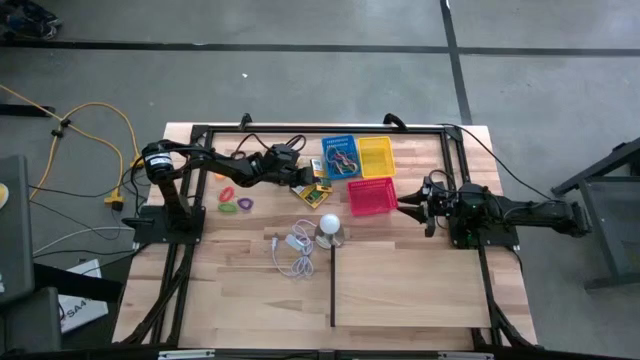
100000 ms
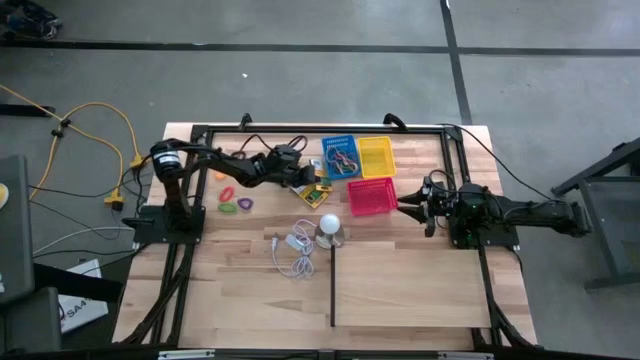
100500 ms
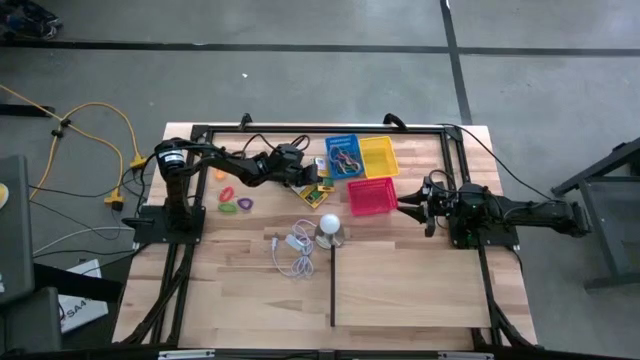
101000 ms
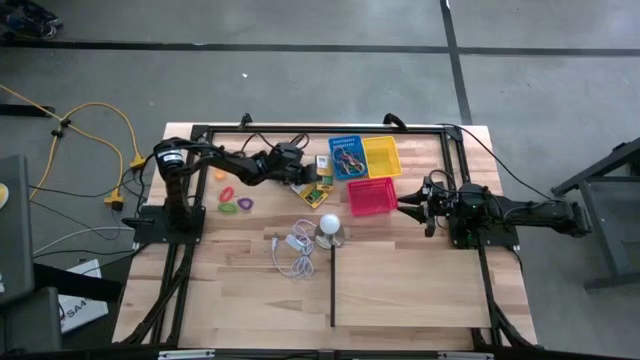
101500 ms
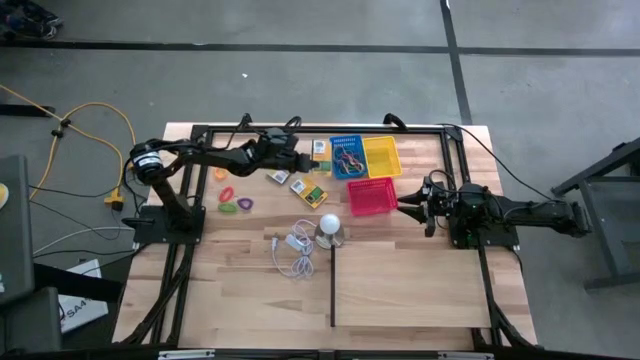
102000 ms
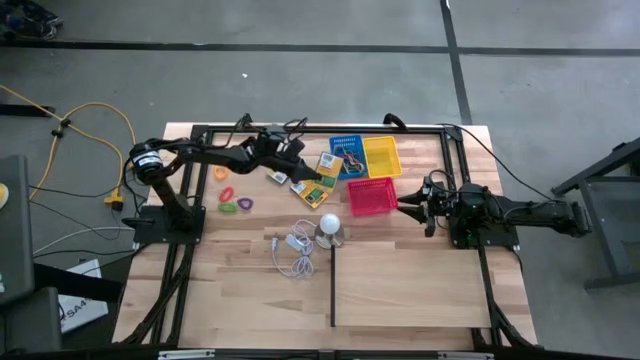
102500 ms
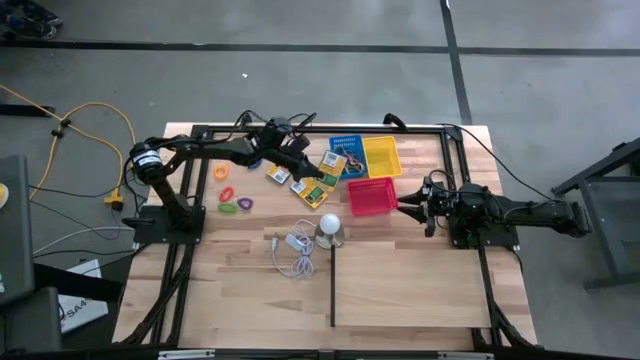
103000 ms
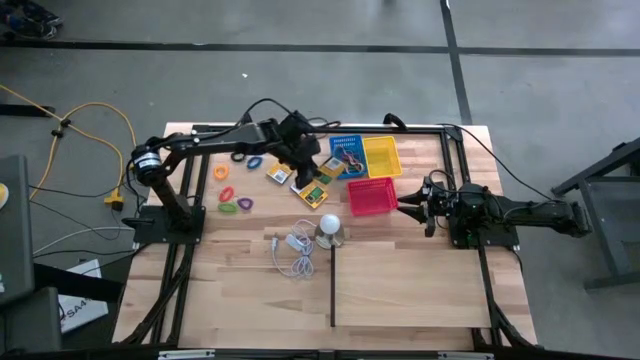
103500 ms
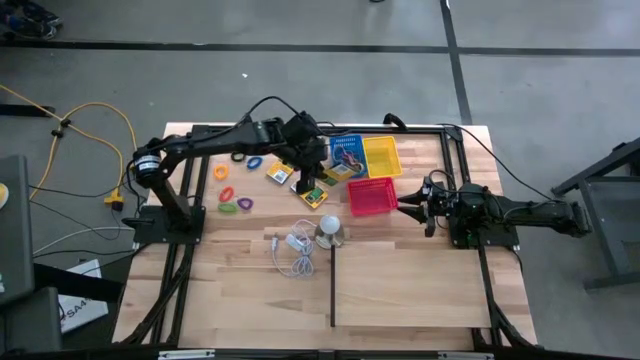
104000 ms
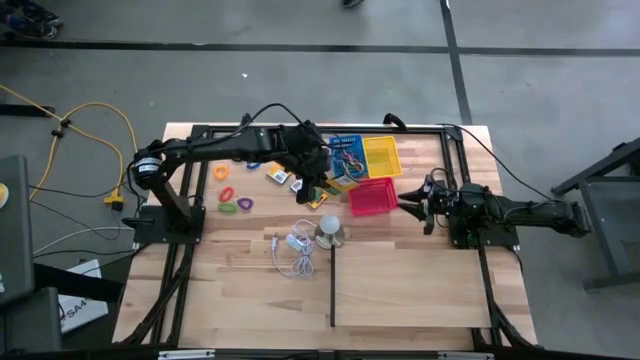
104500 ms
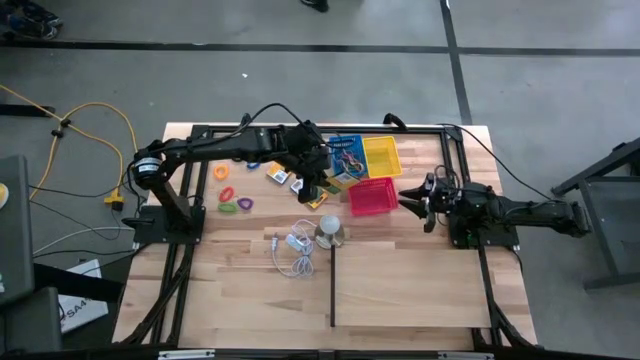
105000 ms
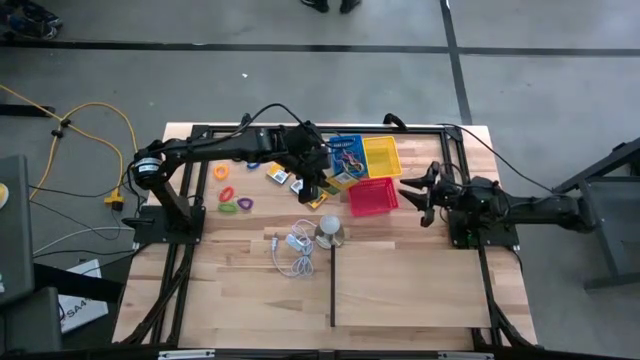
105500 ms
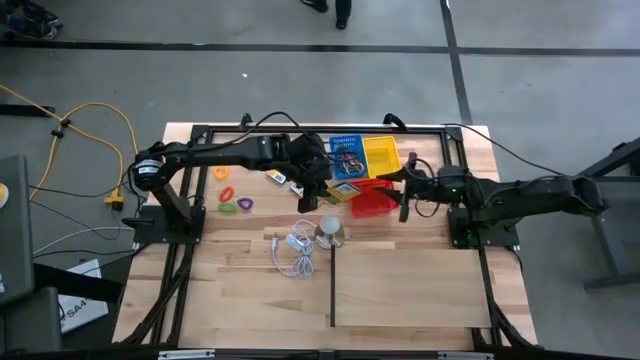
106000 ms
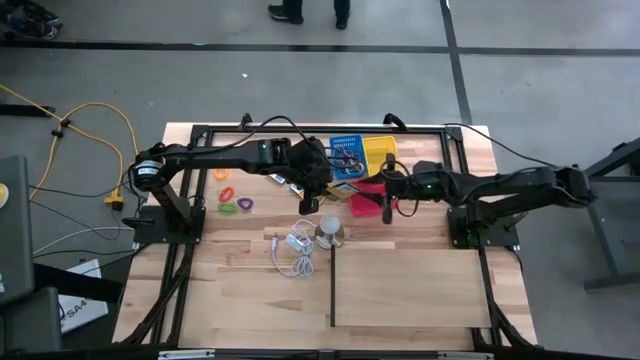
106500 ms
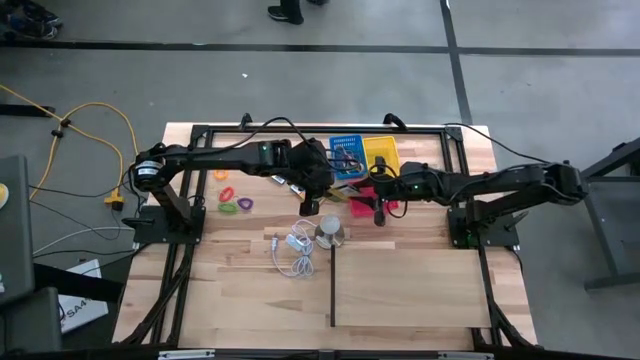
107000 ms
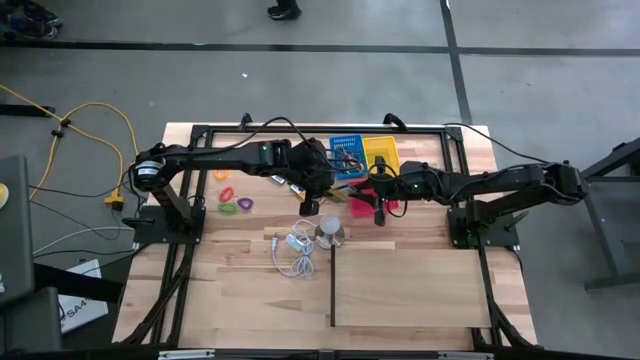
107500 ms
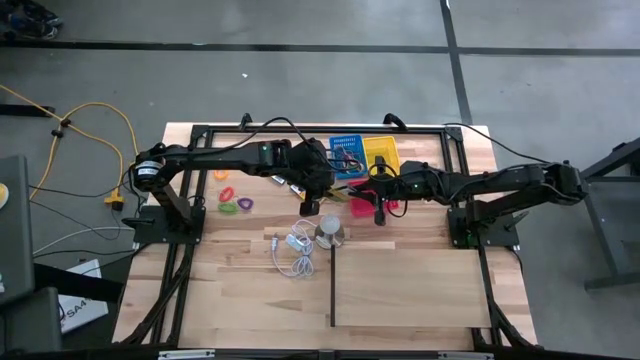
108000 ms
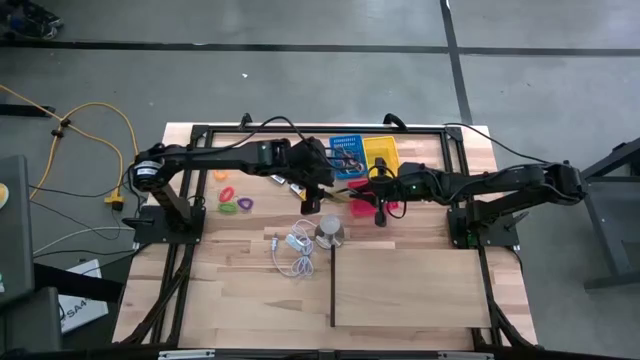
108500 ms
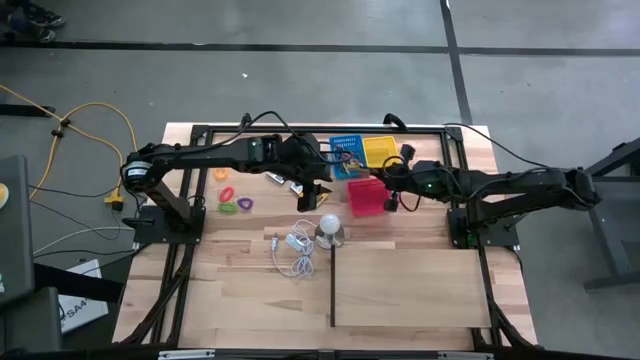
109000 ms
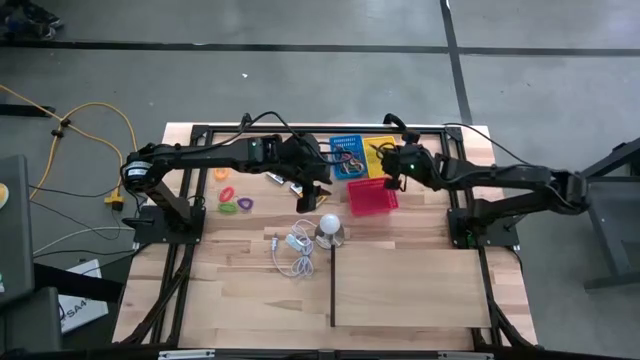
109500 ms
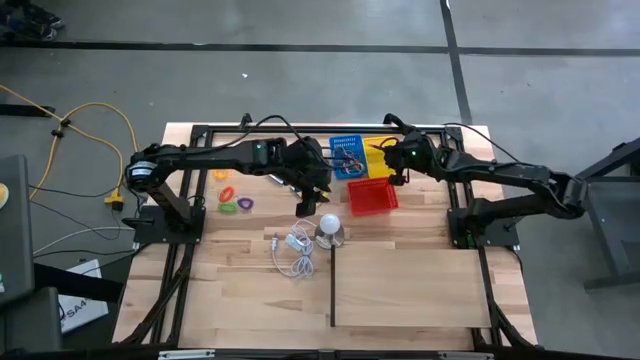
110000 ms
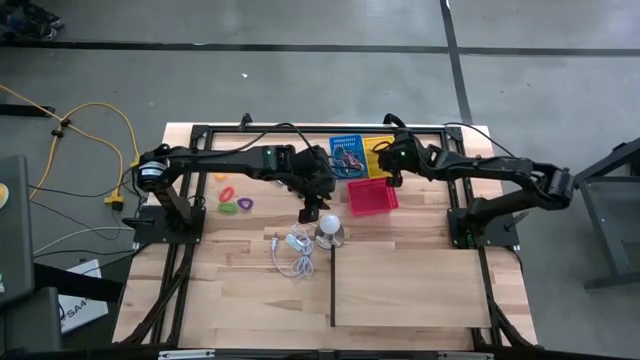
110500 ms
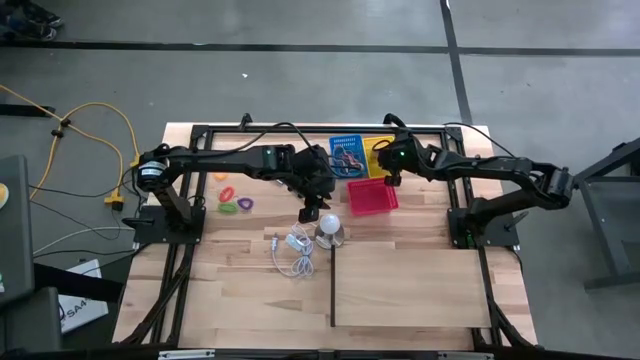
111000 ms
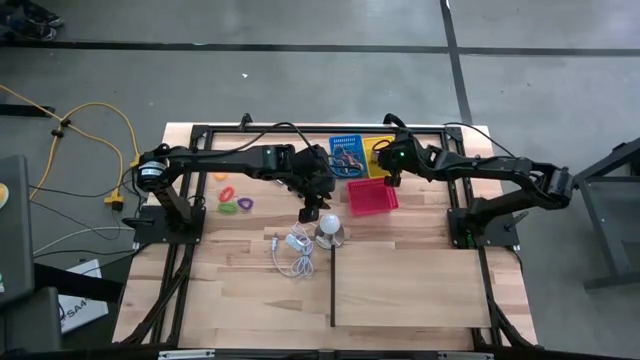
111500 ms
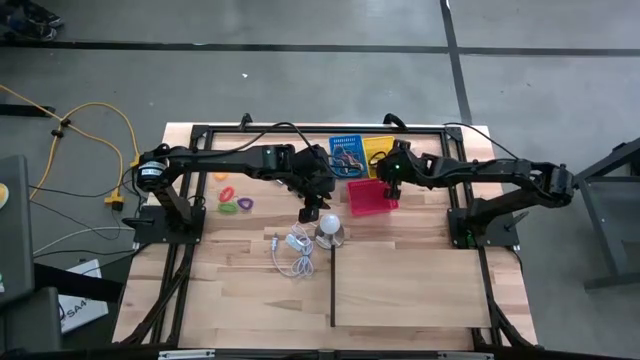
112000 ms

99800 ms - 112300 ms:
Task: Pick & Place Office Desk Supplies
Put the right yellow crayon box into the yellow bin

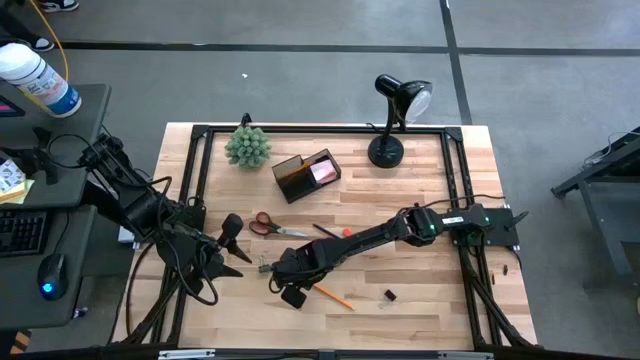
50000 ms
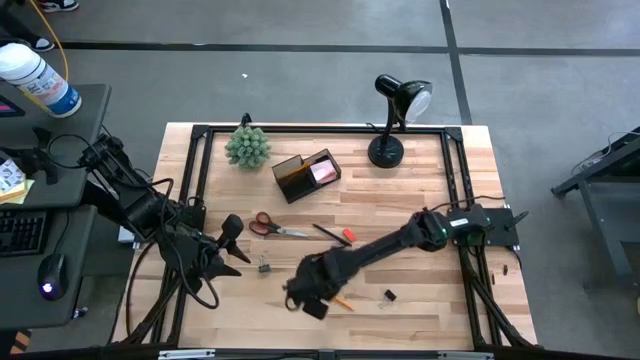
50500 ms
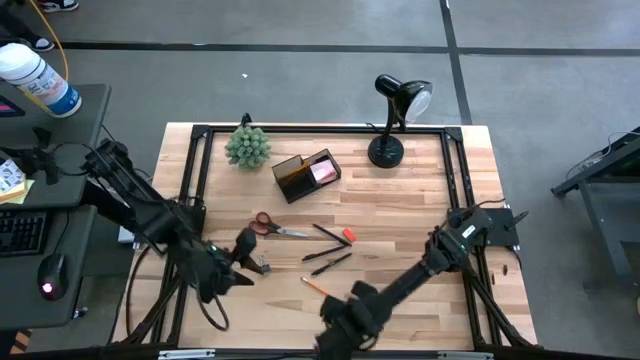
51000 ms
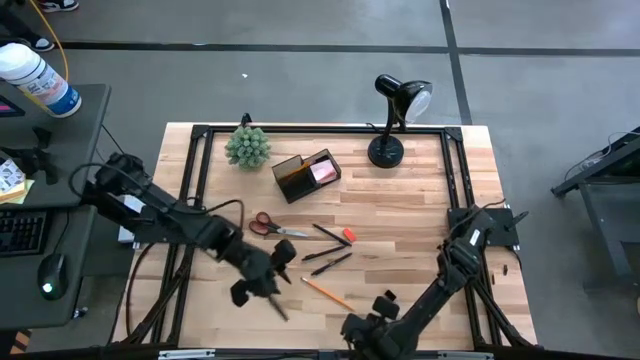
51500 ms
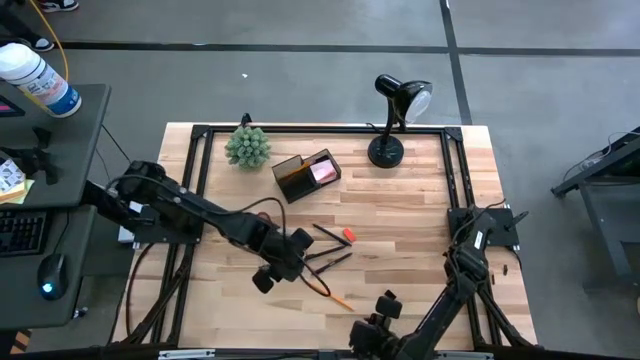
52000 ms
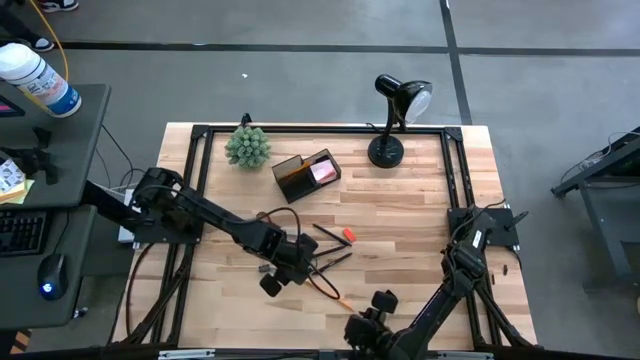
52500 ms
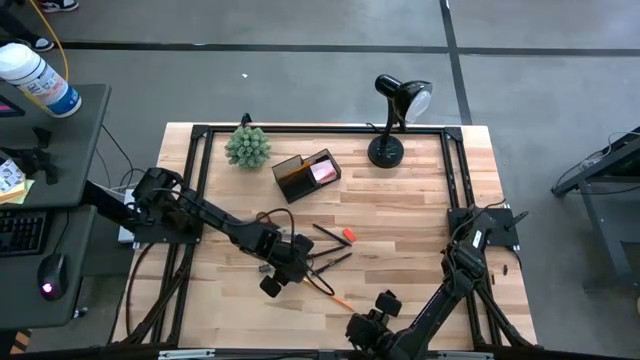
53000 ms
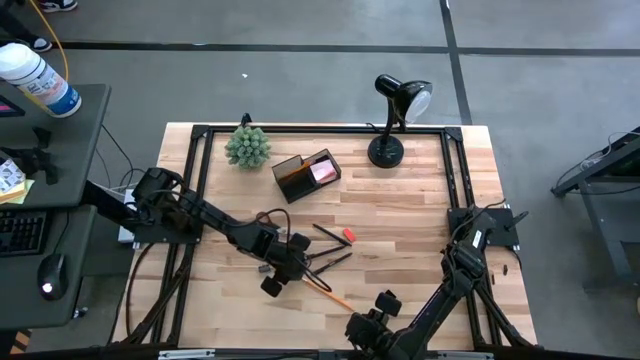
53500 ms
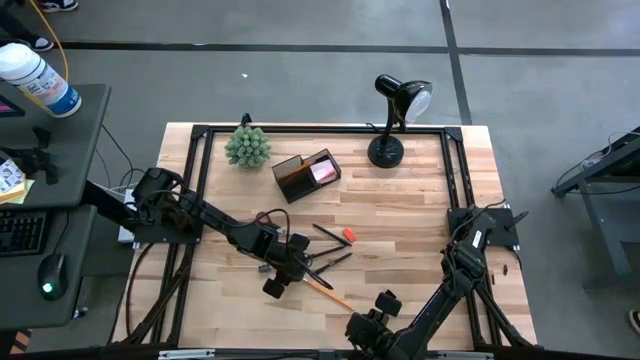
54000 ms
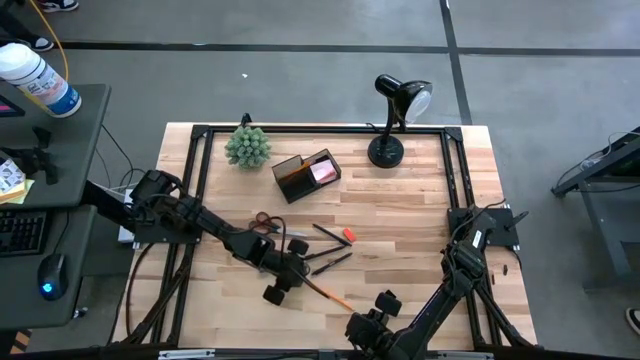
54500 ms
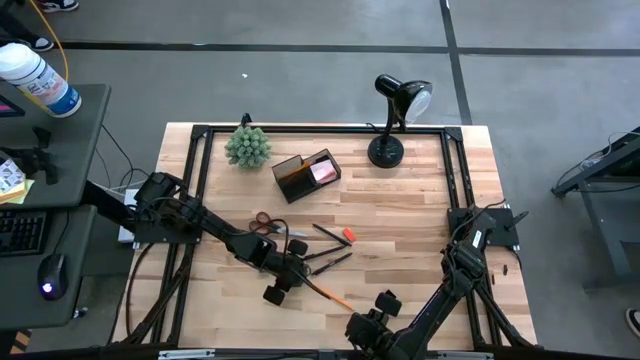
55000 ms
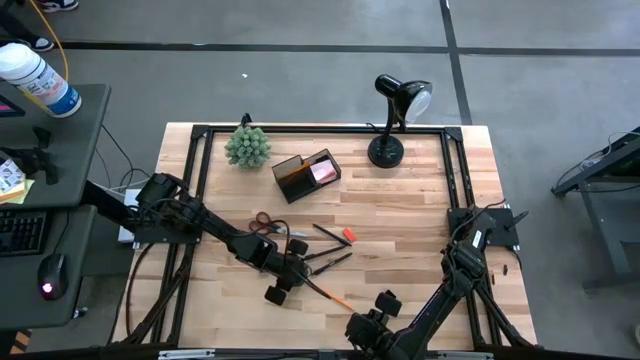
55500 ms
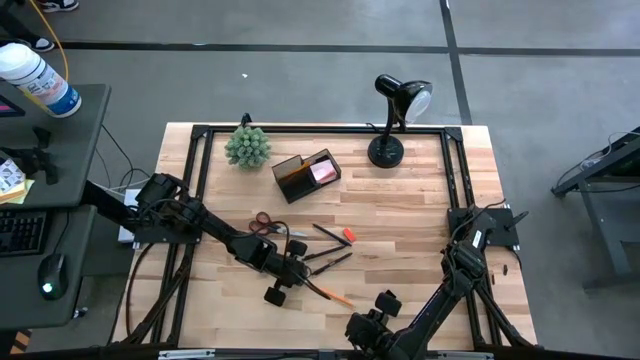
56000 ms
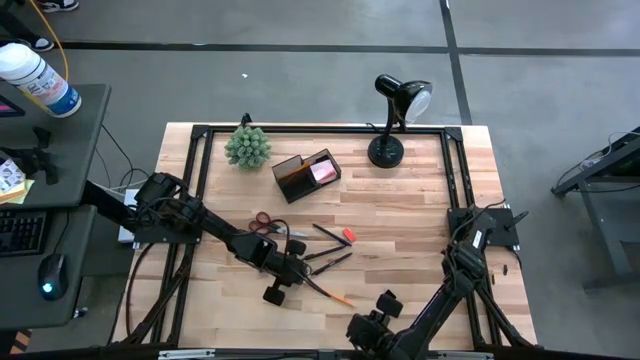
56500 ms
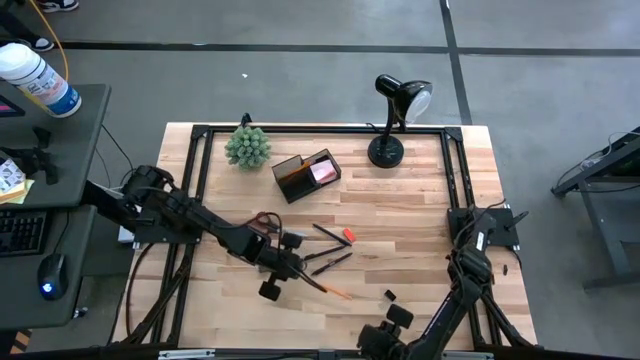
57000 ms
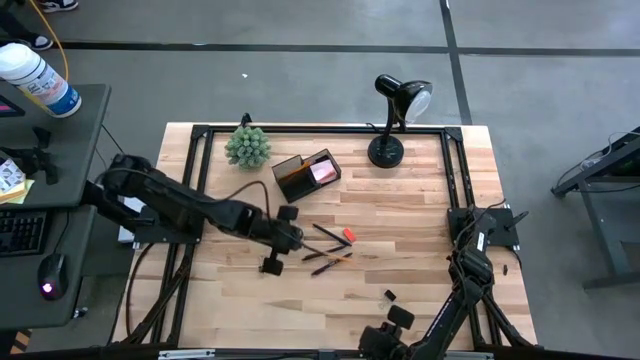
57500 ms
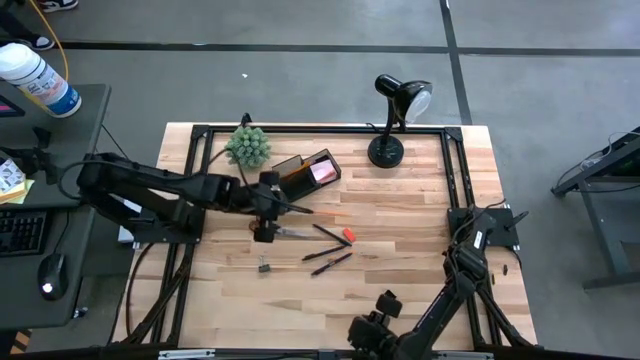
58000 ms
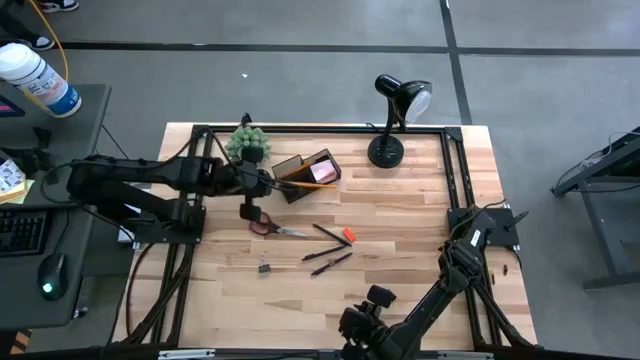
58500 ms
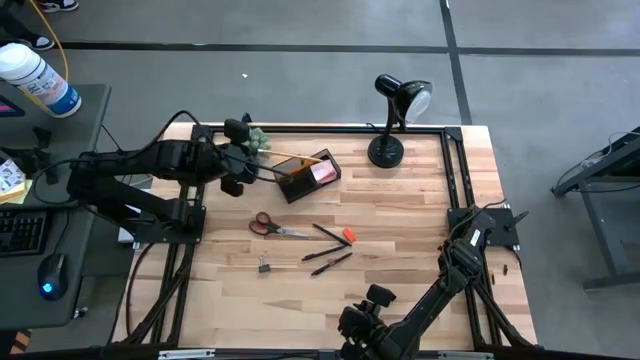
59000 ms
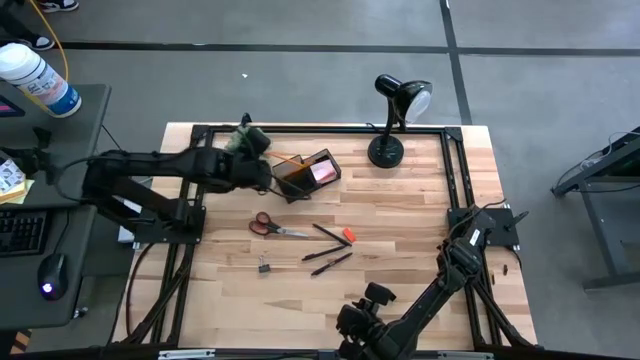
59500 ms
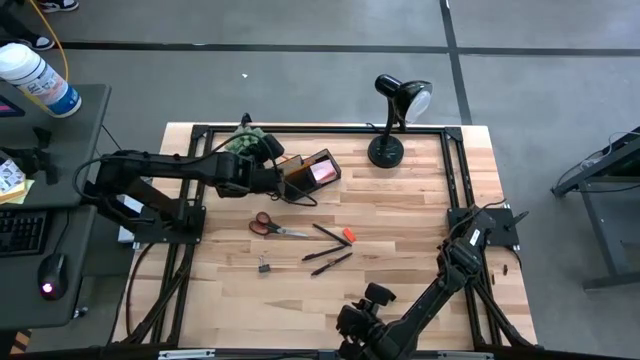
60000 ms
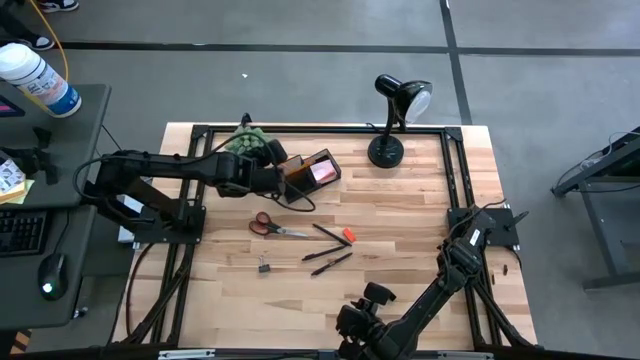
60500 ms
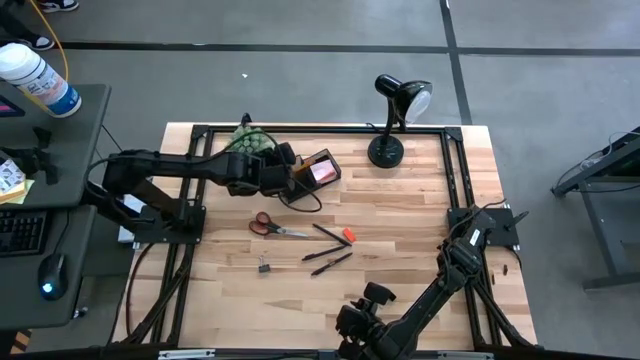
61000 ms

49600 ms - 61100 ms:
Task: Pick and place office supplies into organizer
Put the orange pencil into the black desk organizer
